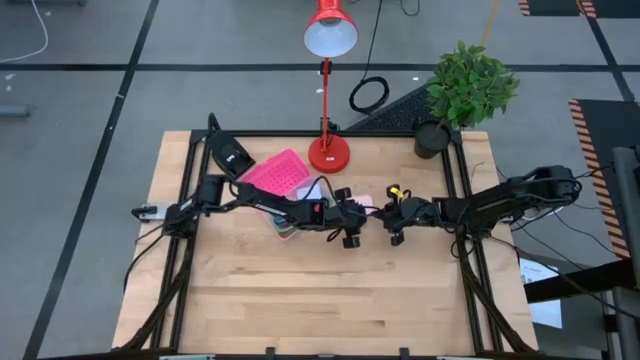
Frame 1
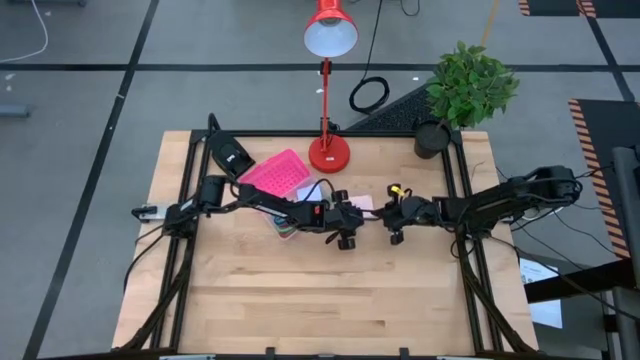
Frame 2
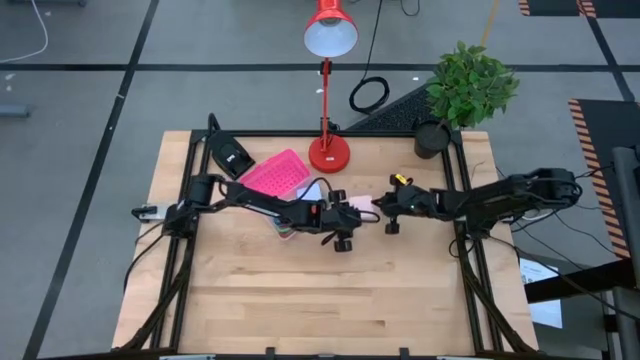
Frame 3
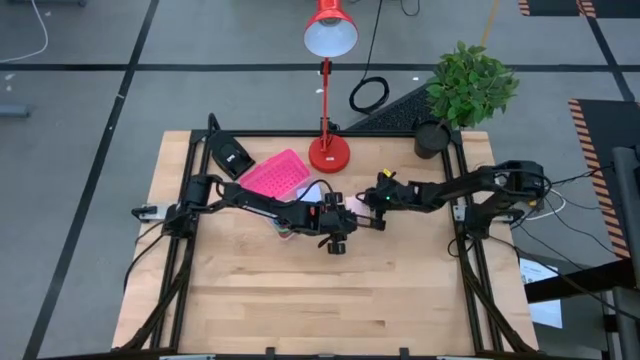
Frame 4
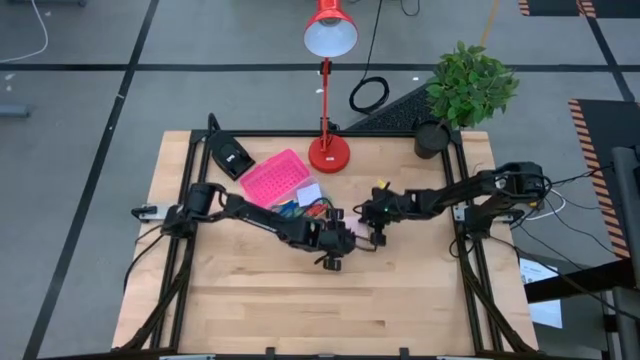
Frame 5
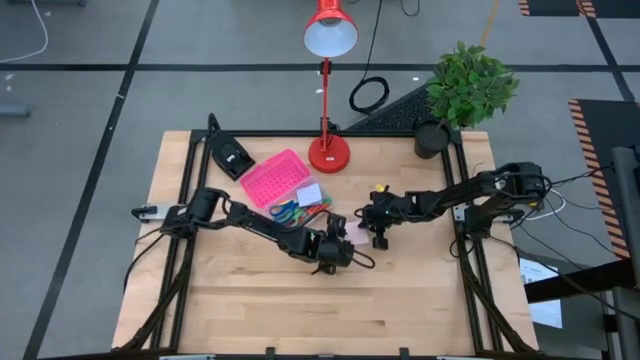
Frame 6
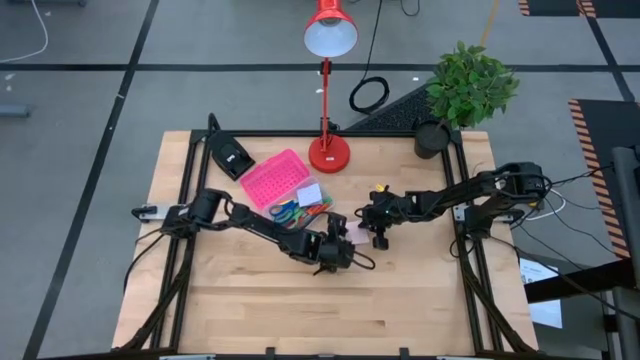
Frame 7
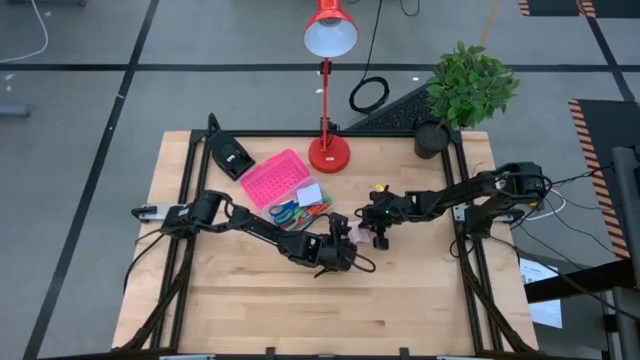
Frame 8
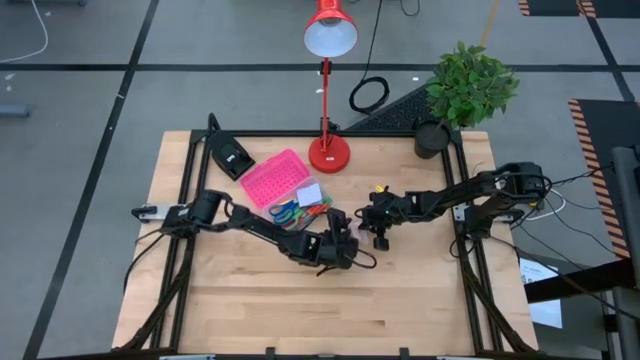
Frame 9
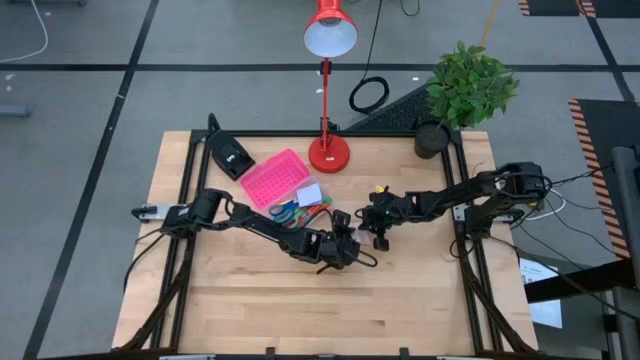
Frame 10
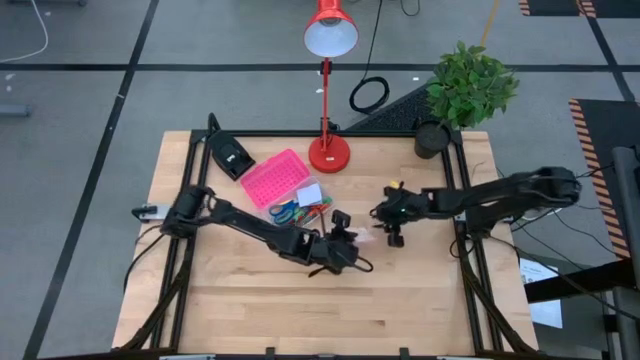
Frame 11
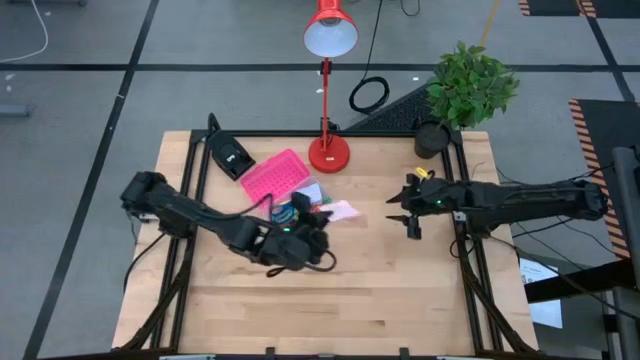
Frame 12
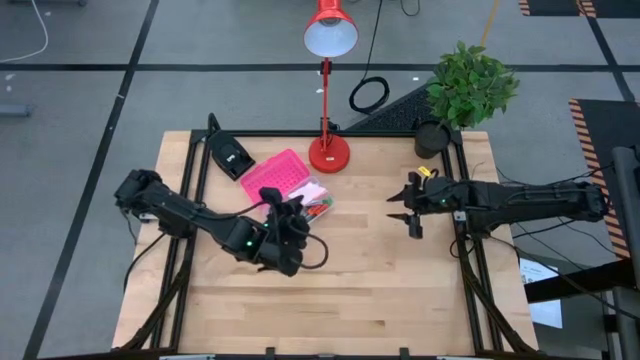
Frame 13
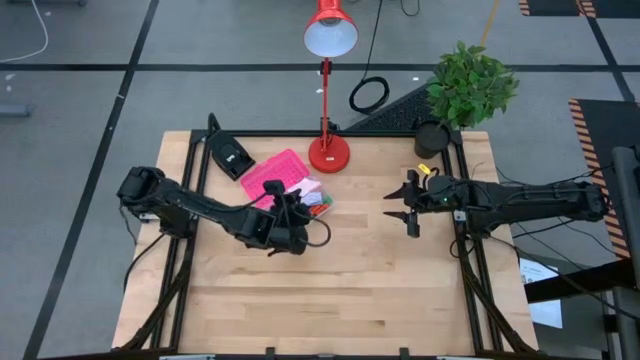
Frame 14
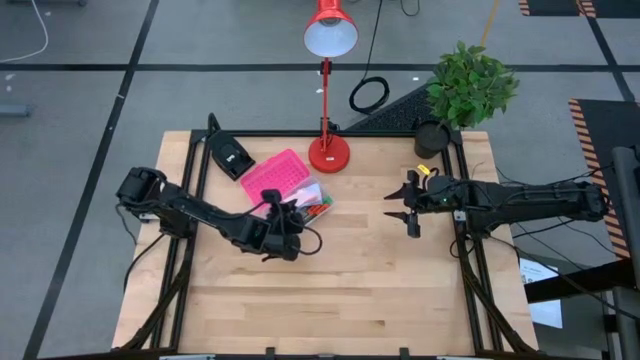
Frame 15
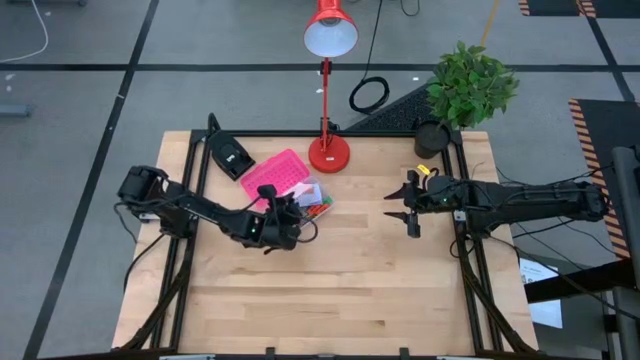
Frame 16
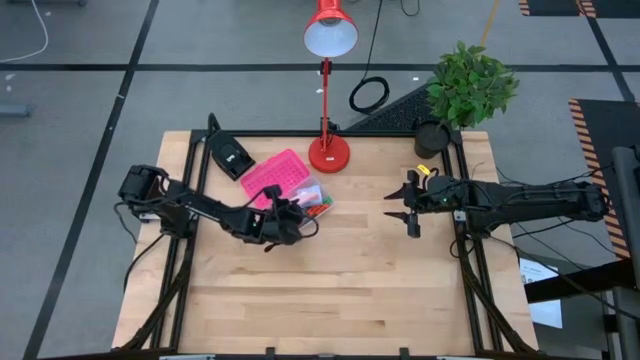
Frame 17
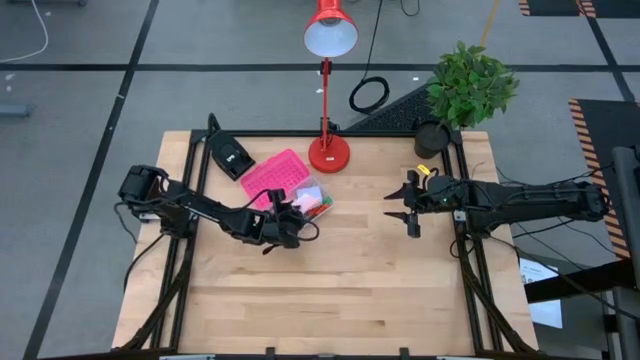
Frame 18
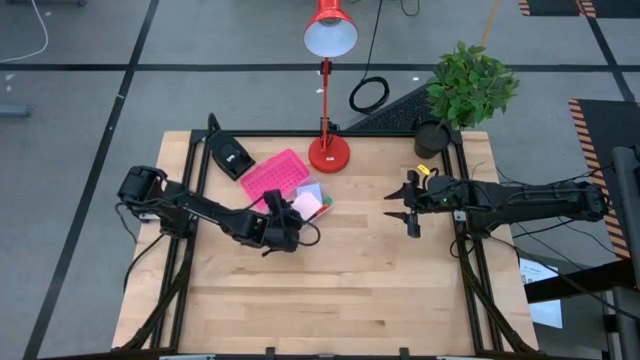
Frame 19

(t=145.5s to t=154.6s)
Task: Pack school essentials
Put the pink sticky note into the pink supply box

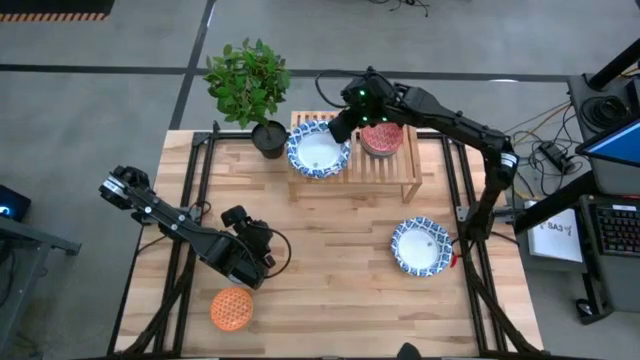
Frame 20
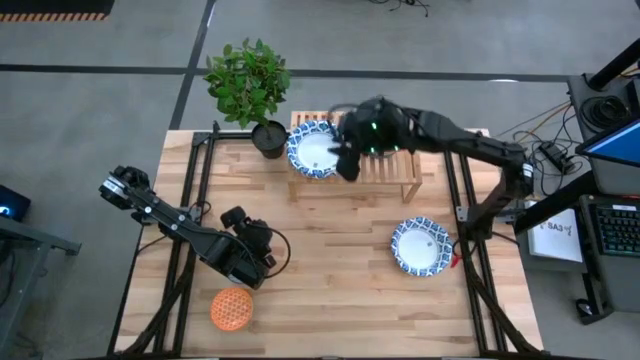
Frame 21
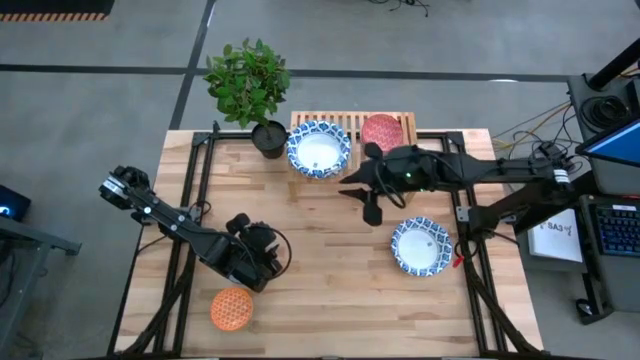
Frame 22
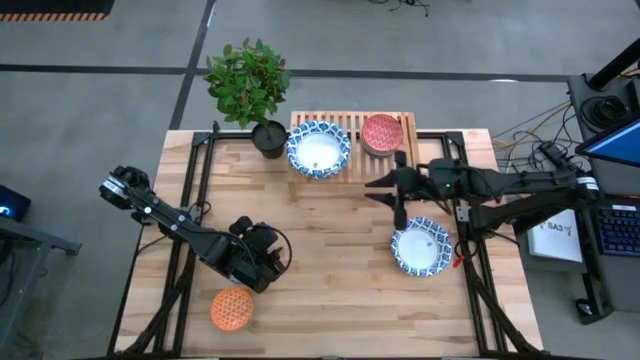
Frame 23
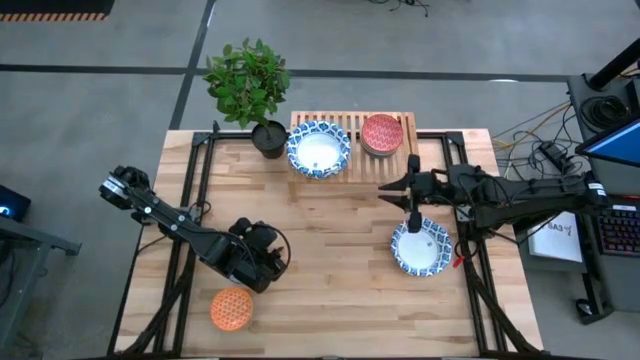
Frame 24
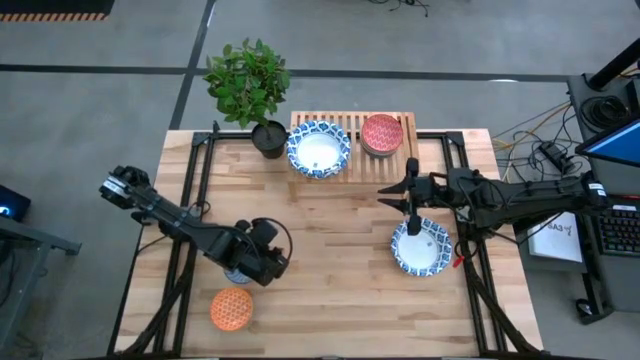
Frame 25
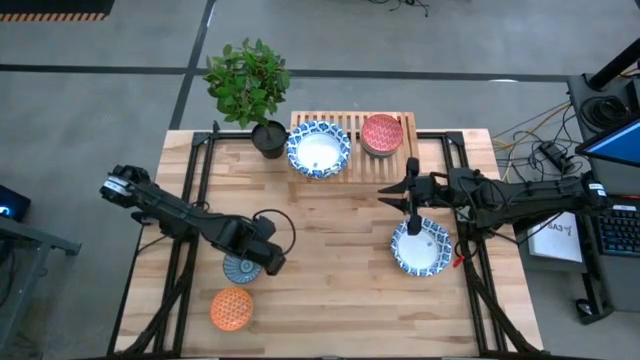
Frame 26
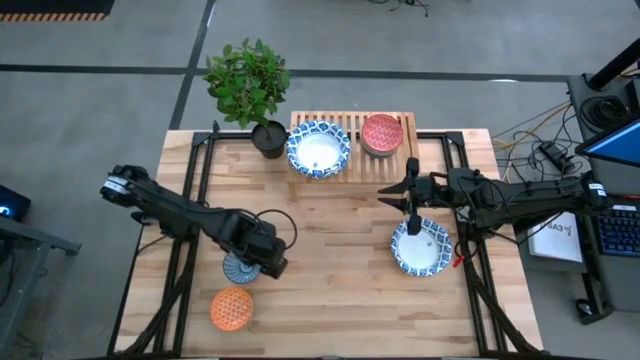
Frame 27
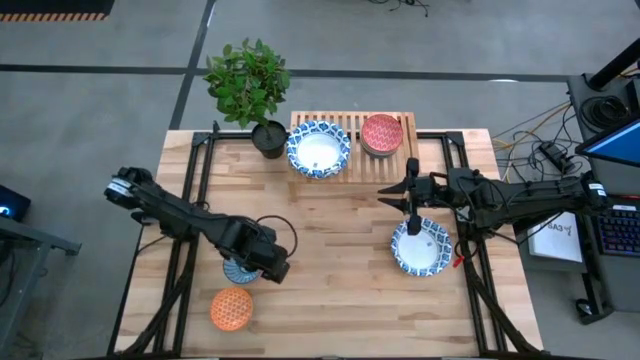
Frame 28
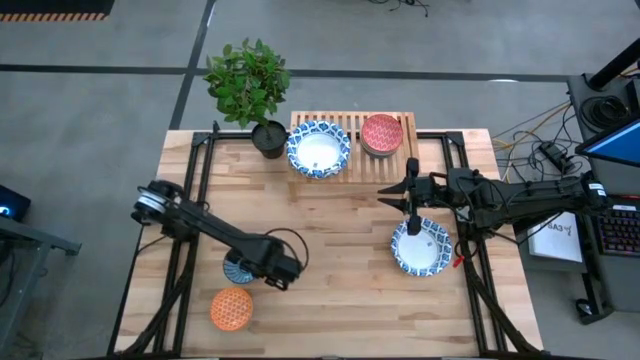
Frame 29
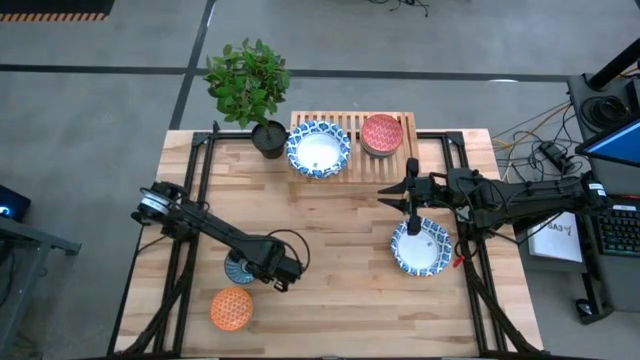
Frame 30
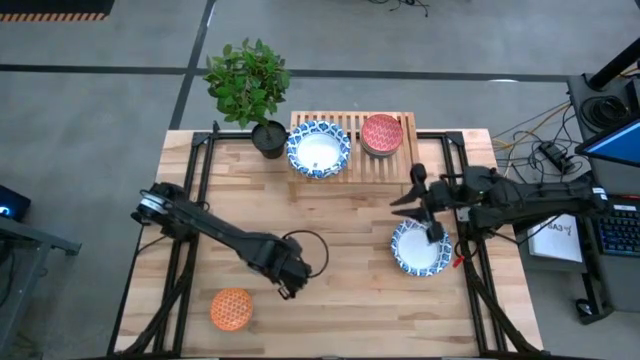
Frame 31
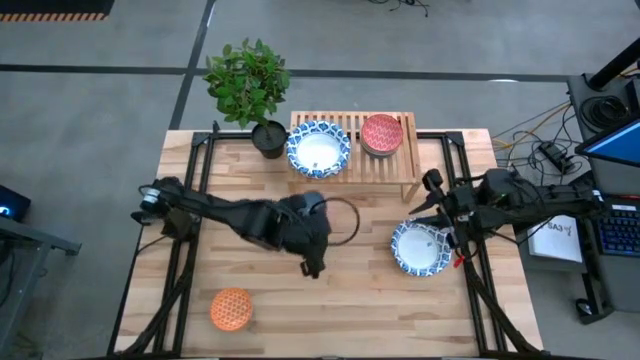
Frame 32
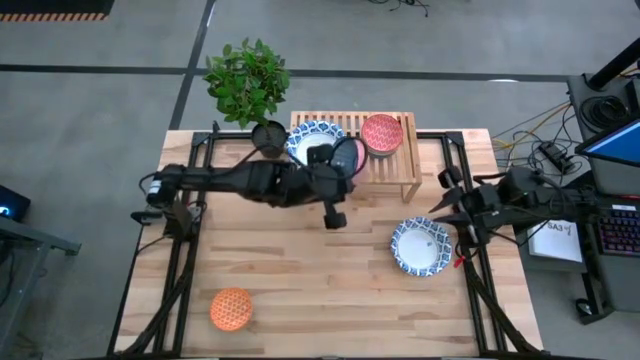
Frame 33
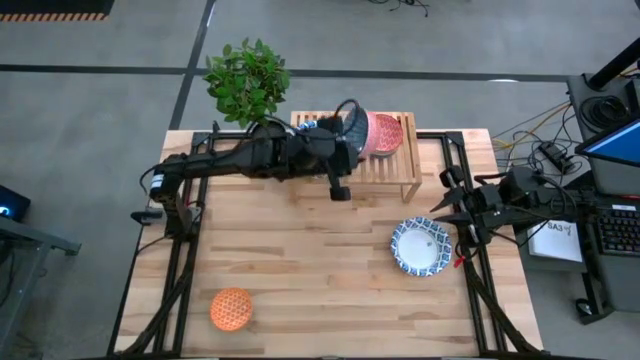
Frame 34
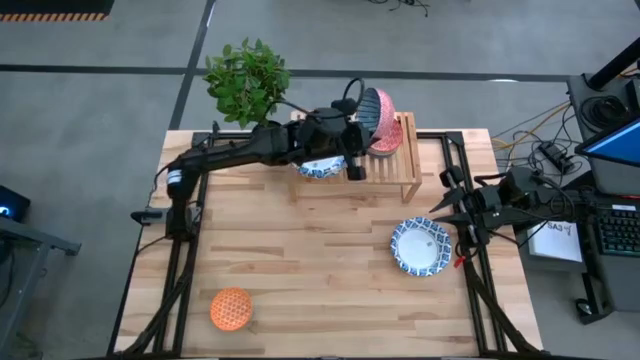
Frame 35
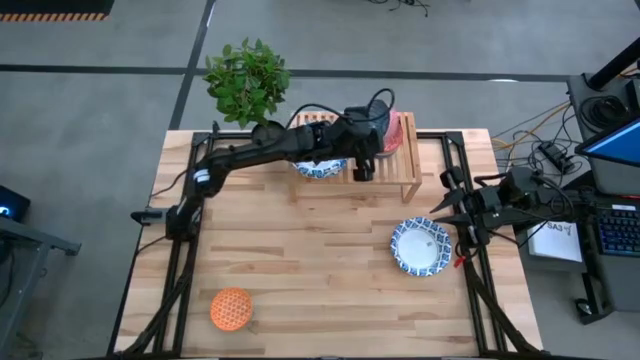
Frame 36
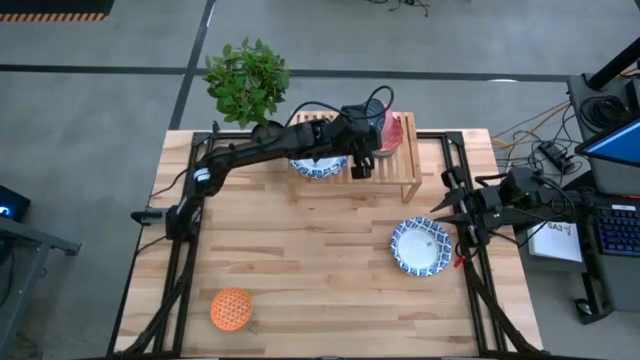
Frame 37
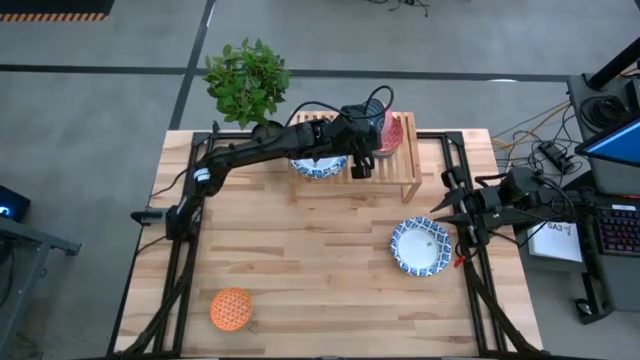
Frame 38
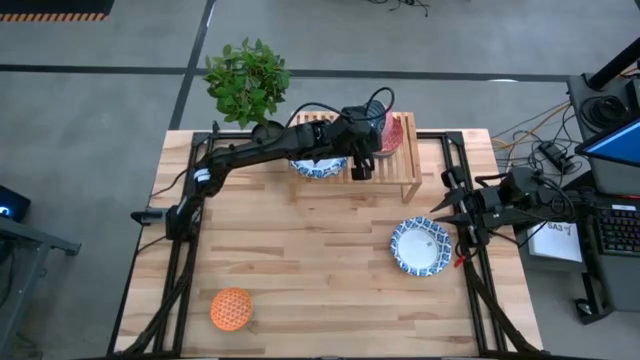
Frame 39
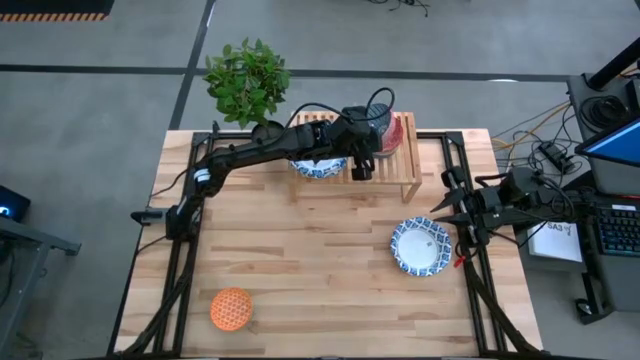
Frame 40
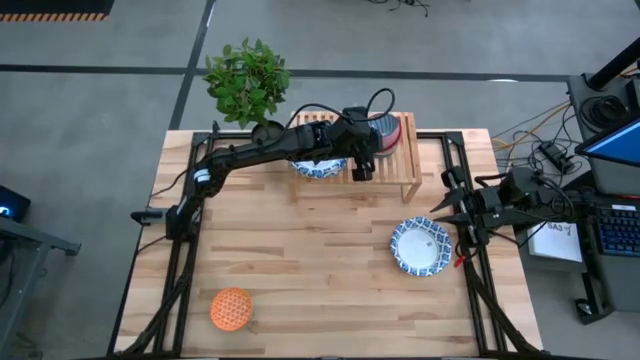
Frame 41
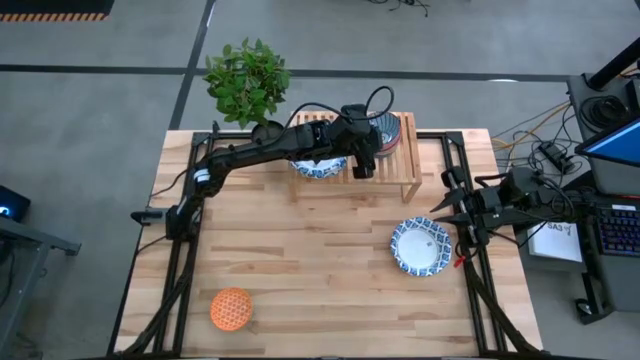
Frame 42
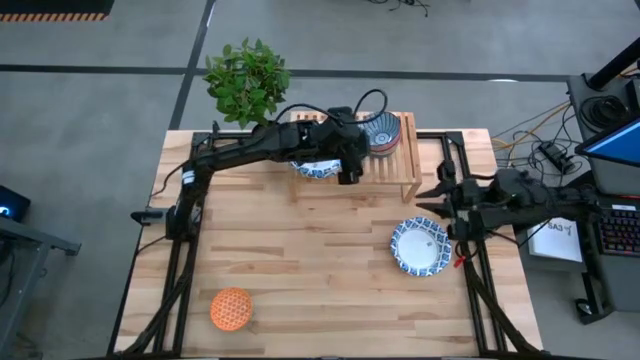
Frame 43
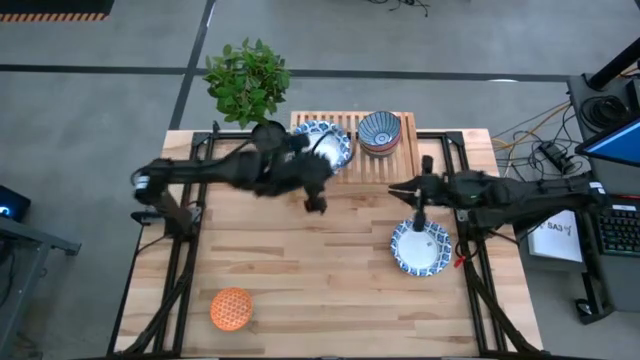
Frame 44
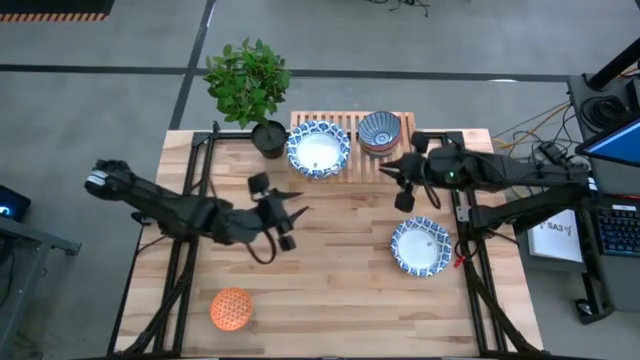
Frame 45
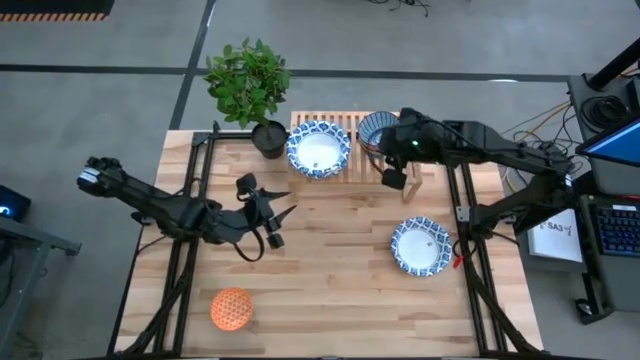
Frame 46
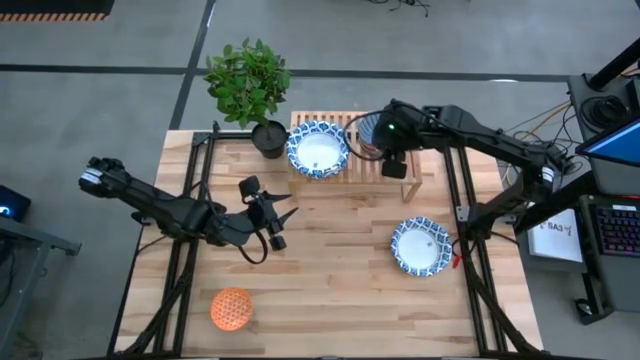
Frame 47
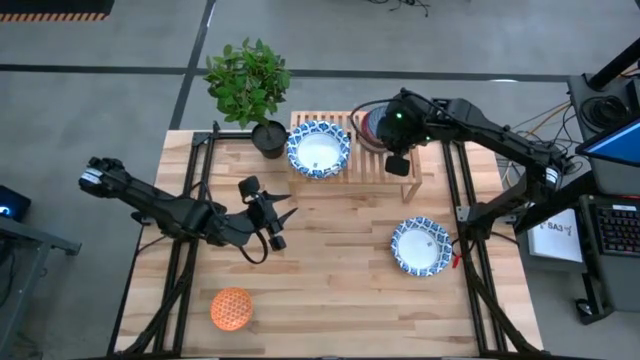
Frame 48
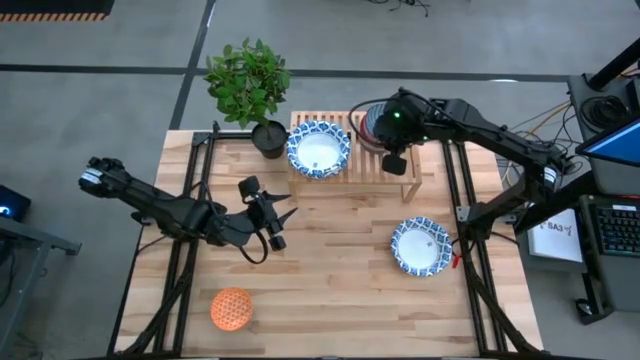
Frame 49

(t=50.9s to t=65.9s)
Task: Place and stack bowls onto a shelf
Stack the blue bowl on top of the red bowl on the shelf
